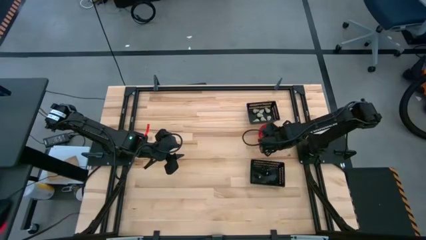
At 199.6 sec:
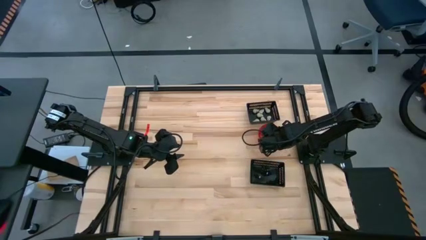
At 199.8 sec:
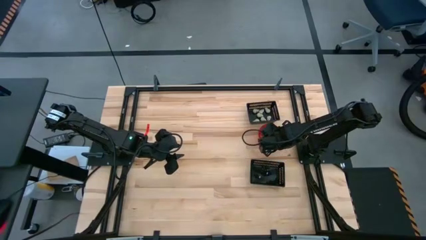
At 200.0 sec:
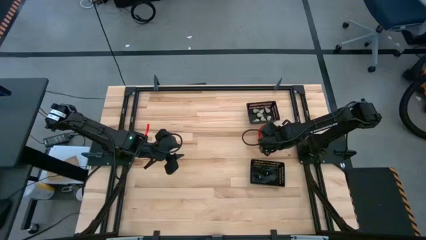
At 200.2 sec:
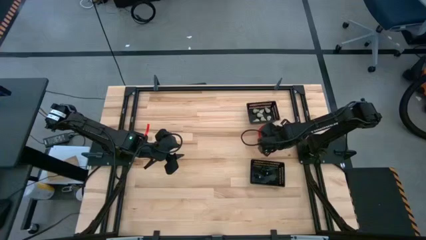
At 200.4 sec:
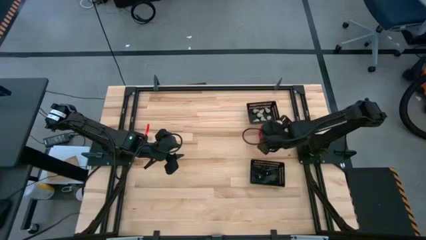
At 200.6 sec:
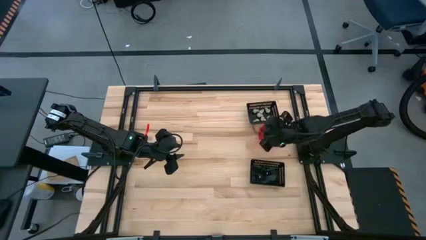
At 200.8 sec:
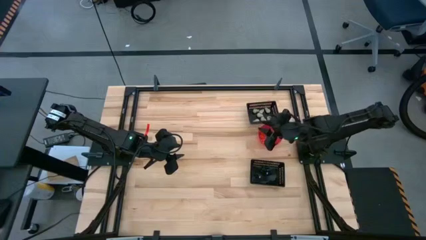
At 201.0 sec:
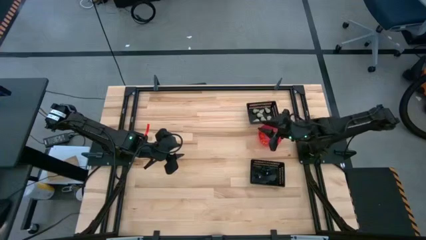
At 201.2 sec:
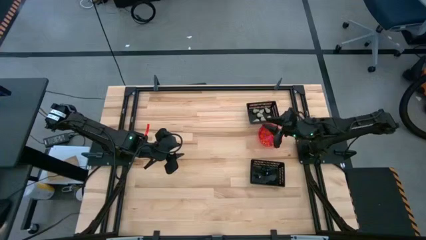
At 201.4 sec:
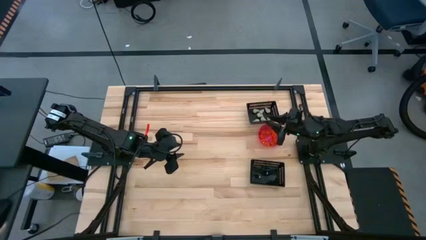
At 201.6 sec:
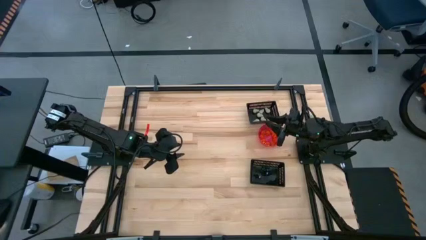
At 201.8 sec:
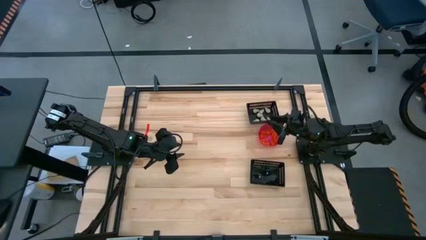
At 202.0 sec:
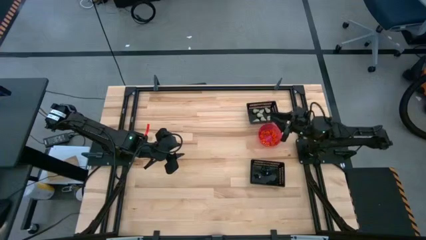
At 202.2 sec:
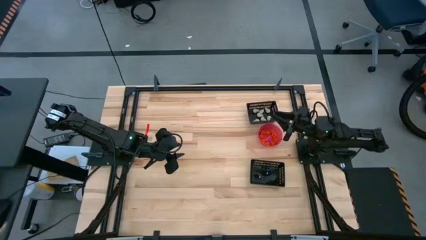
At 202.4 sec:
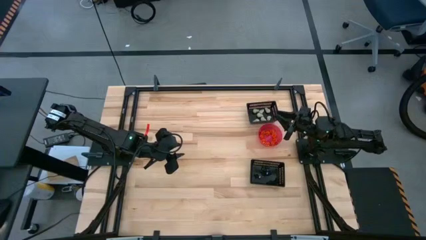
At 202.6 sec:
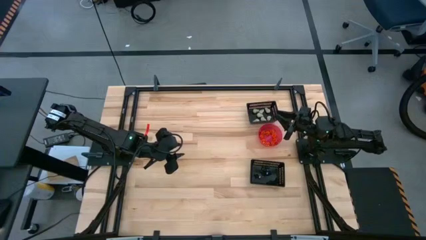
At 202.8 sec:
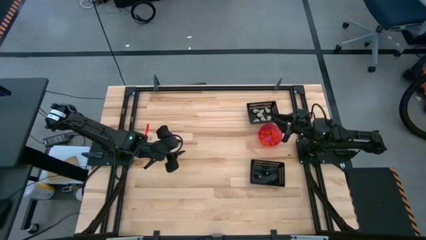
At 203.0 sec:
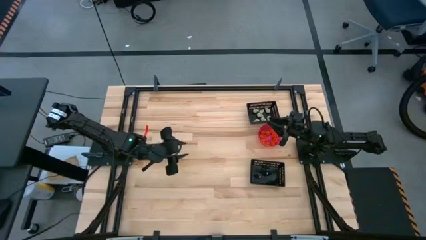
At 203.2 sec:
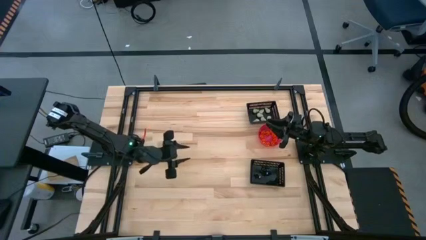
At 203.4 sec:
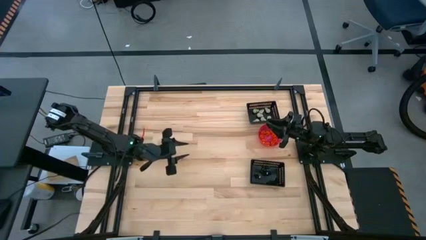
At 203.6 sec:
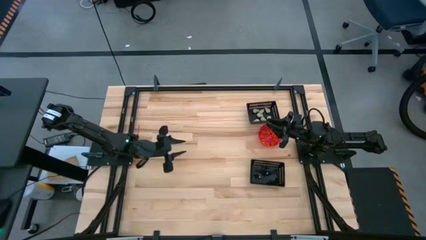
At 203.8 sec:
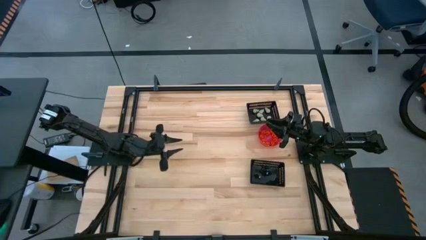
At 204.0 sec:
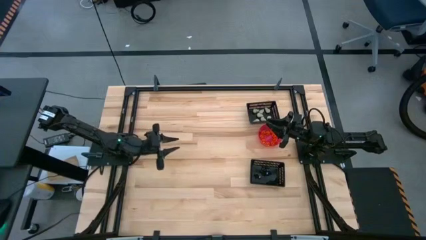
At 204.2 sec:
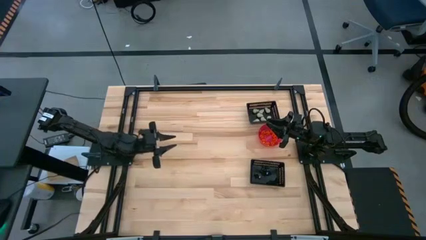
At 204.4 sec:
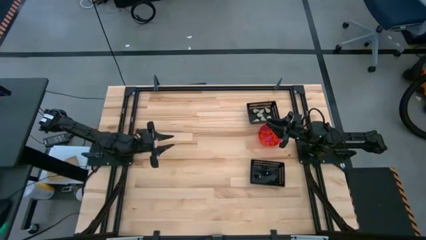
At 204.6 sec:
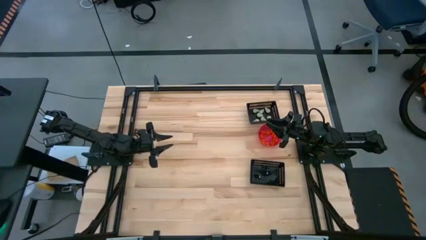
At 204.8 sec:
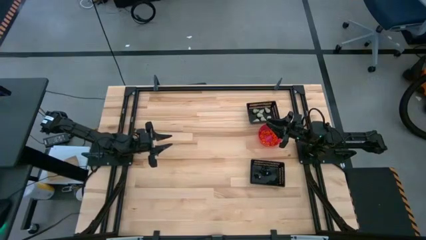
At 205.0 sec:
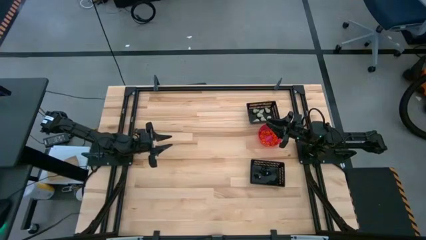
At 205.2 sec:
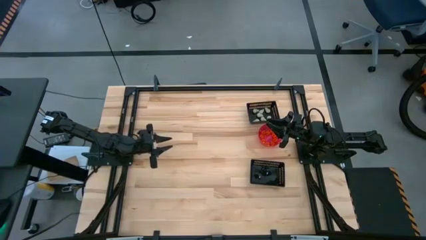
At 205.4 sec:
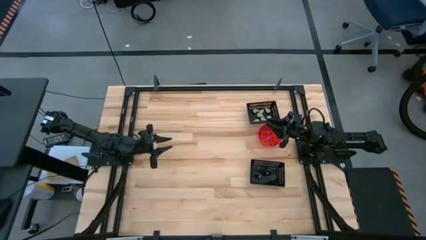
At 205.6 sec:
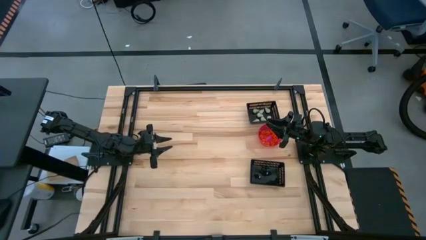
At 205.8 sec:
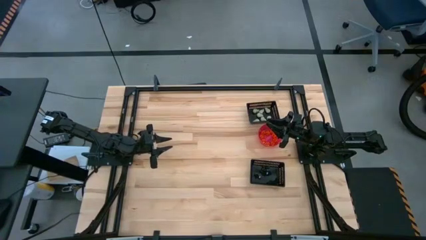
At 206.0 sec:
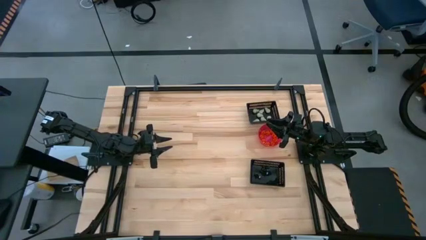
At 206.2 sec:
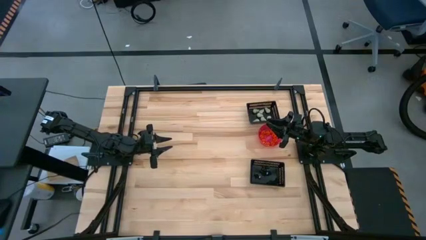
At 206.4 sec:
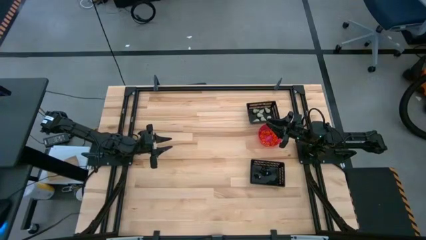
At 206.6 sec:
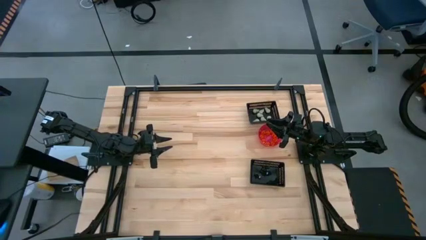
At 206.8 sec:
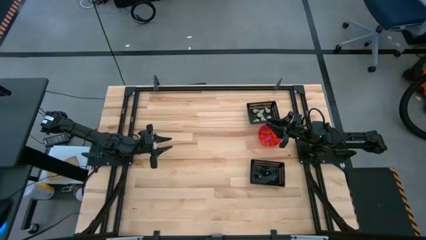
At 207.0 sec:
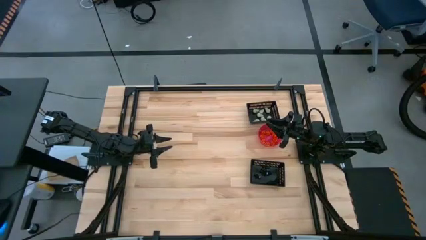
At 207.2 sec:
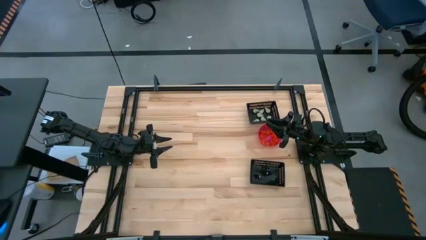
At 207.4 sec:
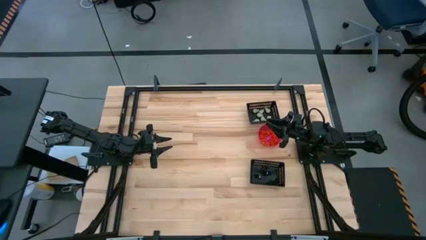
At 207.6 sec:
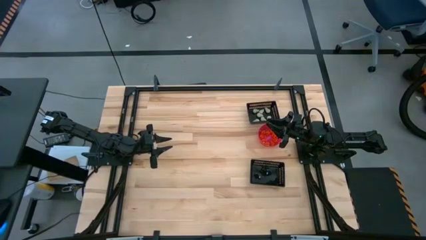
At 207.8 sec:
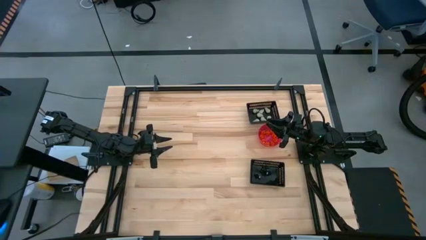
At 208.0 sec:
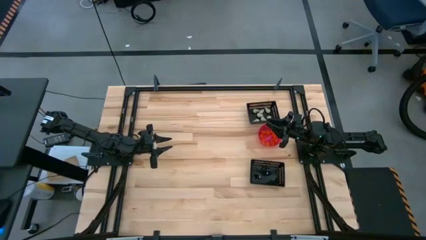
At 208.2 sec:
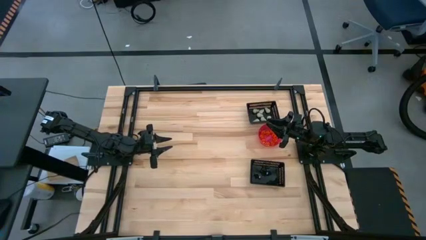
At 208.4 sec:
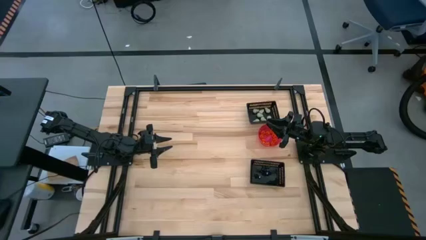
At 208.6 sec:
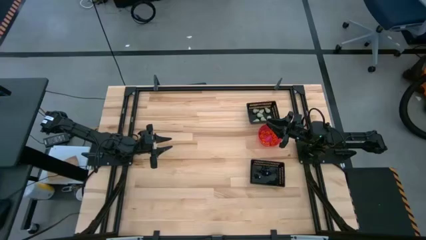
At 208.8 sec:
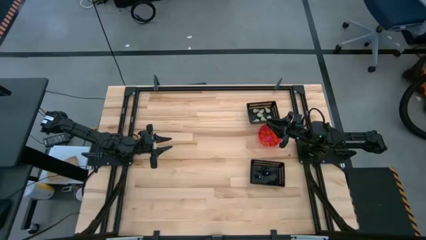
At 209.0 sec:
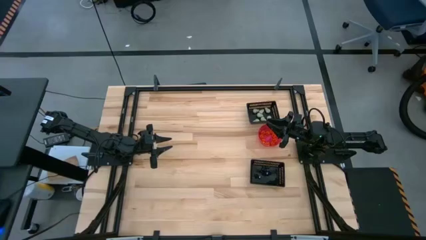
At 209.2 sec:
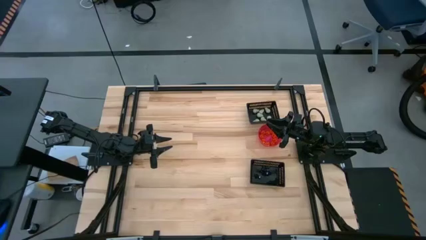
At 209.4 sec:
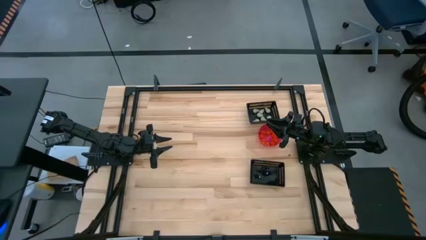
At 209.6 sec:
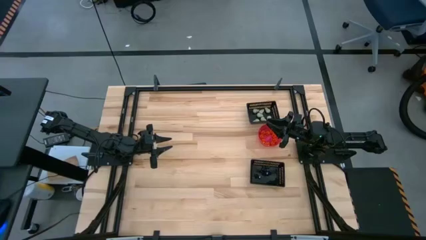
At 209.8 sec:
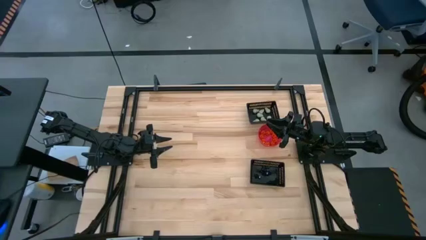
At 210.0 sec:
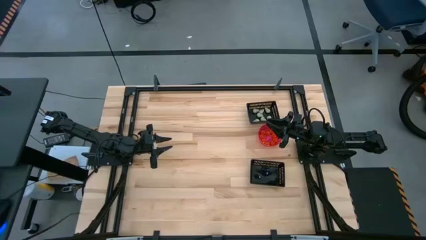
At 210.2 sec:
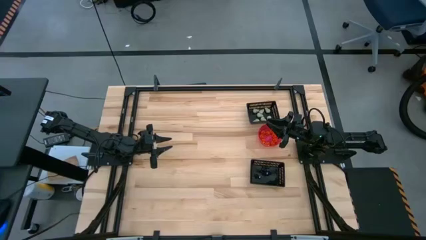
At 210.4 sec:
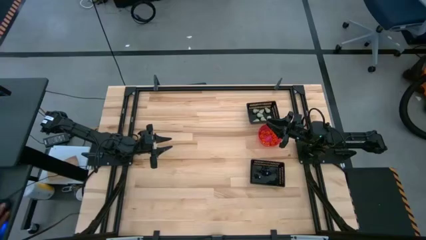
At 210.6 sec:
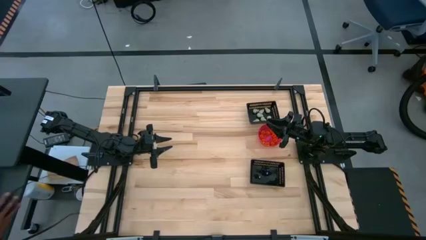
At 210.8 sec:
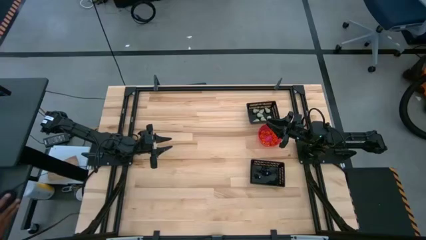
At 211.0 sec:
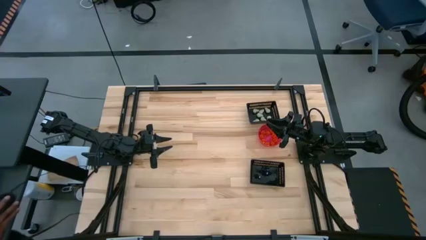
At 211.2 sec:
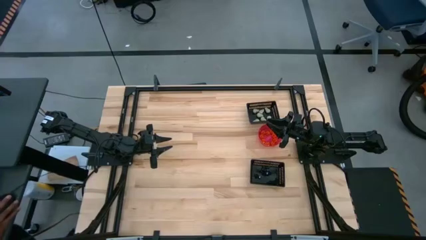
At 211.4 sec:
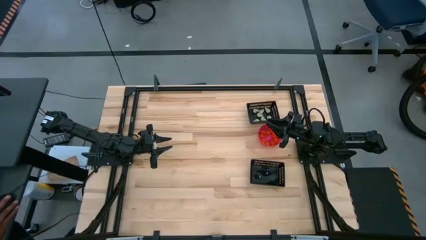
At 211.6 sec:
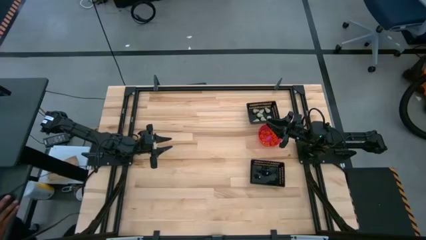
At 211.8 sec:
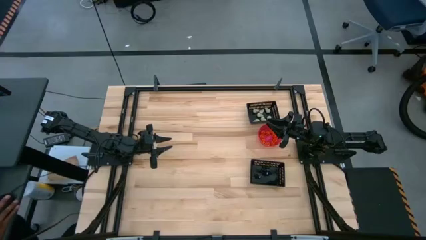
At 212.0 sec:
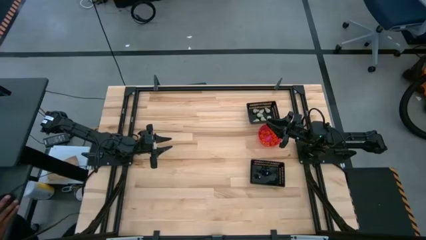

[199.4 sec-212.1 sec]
Task: Sort Halloween decoration
Return to Home Position

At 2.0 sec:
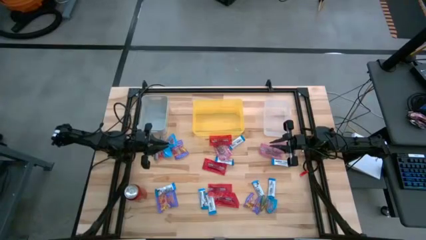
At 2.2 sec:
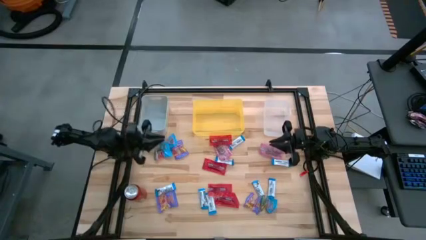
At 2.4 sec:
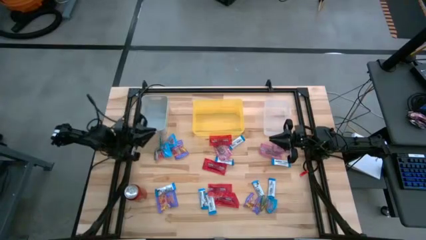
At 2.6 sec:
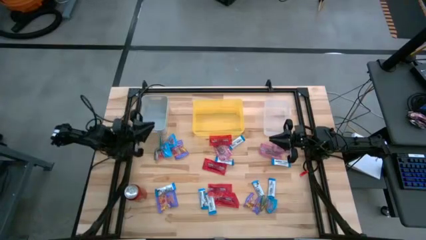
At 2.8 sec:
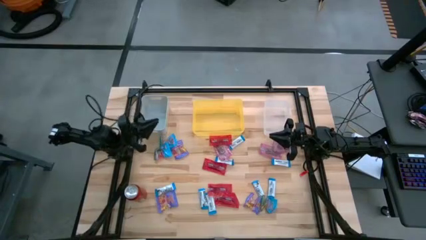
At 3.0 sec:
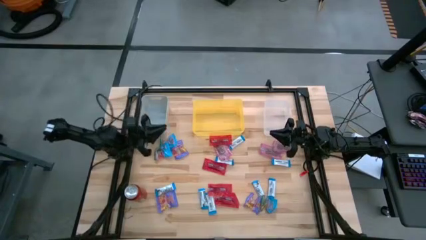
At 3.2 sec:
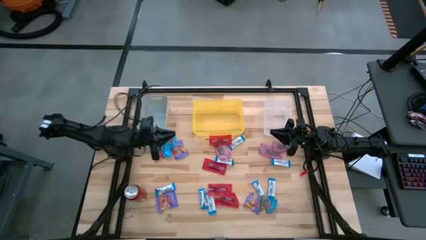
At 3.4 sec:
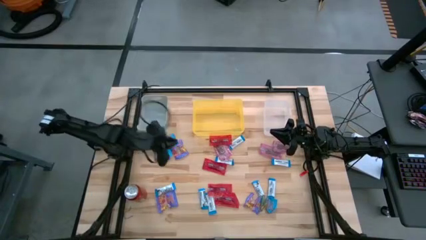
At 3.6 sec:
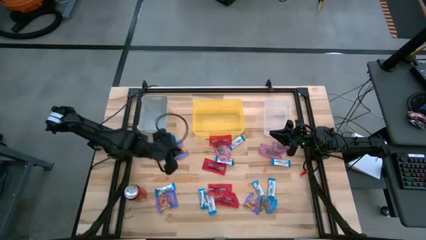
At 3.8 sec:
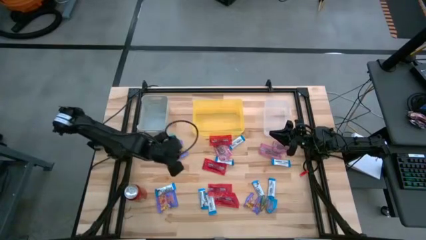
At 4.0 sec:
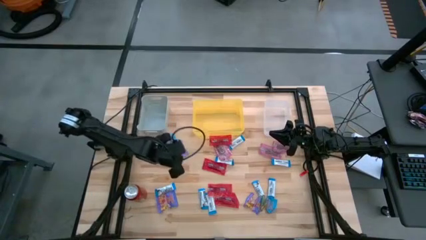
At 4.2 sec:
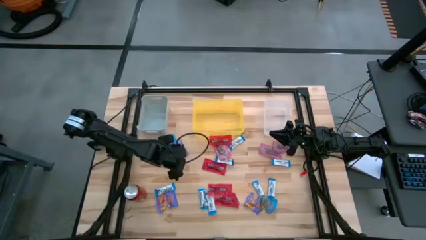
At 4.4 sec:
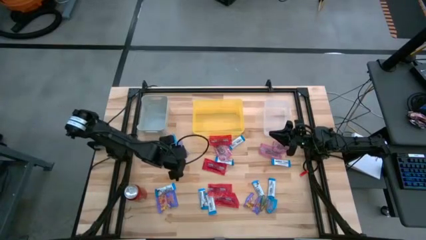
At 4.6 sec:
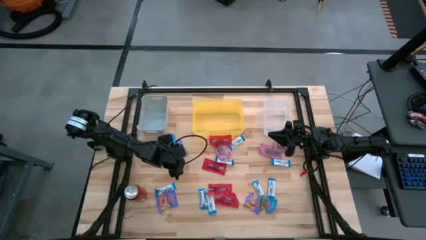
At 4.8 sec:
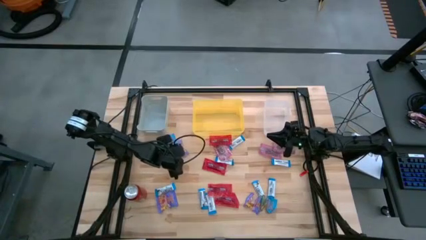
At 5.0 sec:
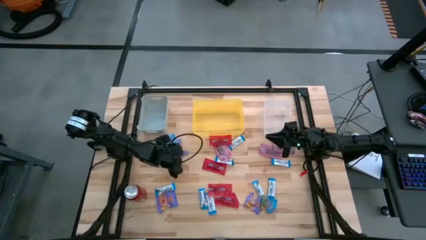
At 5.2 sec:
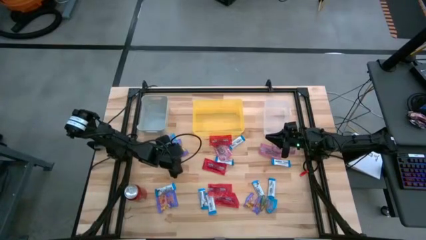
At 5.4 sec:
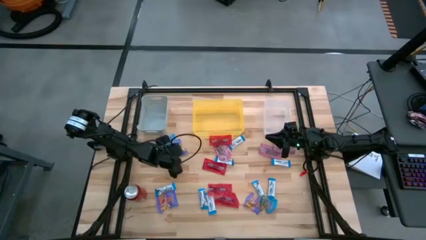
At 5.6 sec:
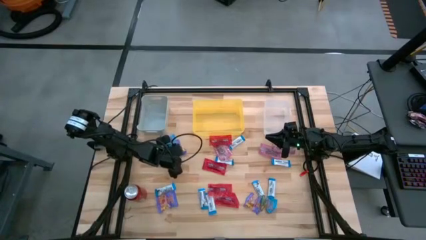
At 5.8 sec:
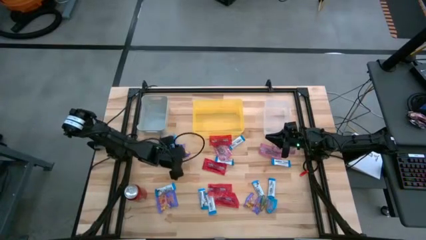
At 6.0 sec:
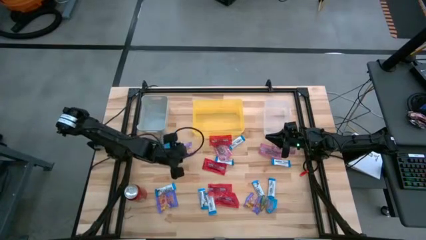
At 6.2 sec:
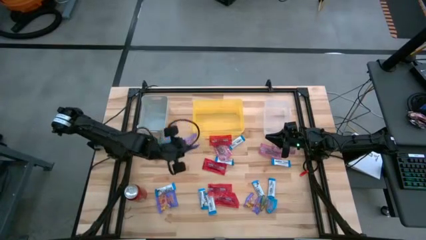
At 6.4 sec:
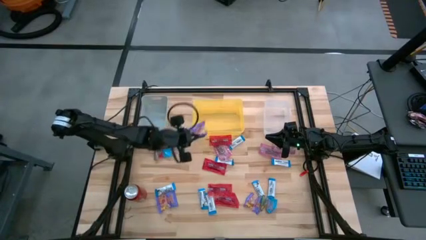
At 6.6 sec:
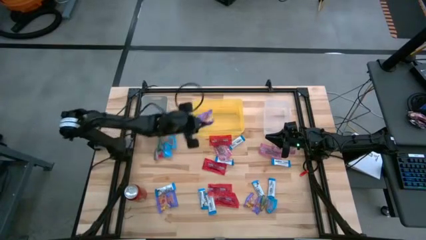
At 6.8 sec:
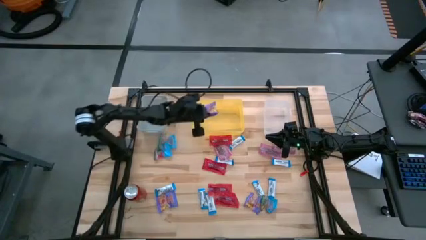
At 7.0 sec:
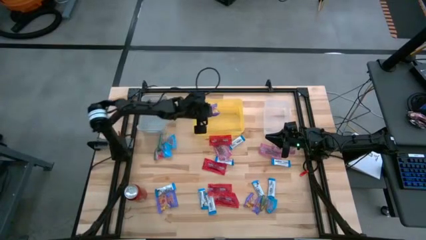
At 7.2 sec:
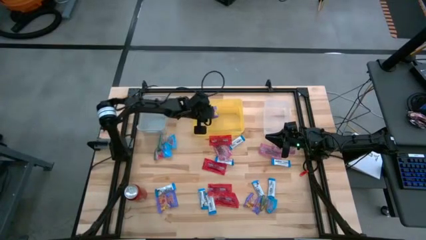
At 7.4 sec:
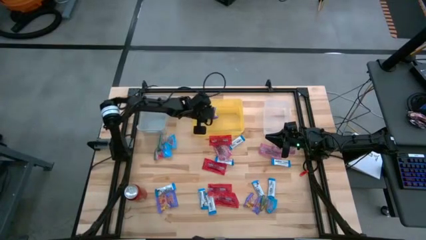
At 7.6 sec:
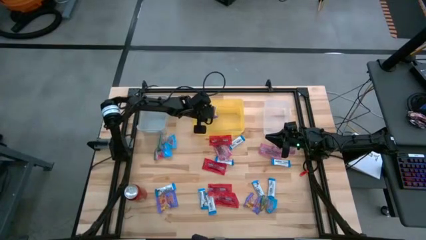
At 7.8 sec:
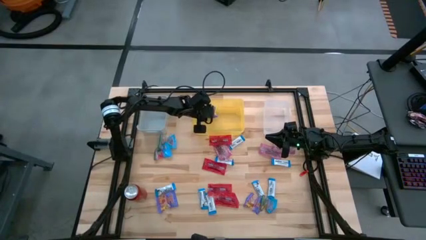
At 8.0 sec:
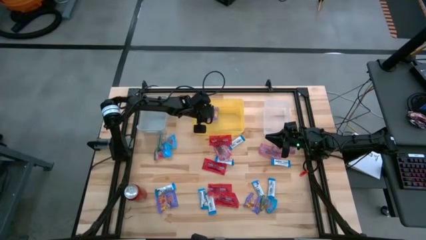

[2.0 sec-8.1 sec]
Task: Sort candy
Put the violet gummy into the yellow bin
